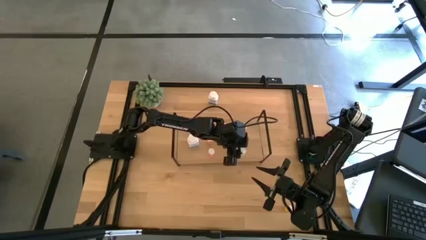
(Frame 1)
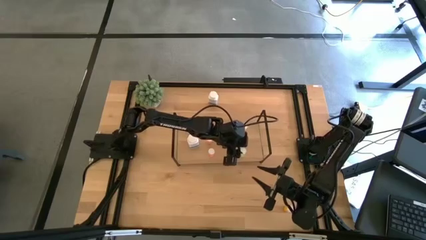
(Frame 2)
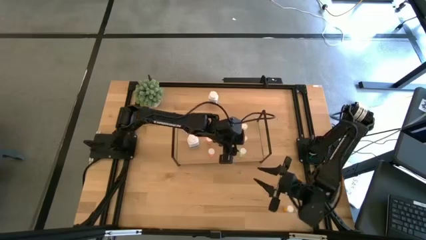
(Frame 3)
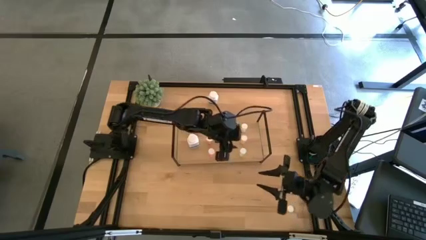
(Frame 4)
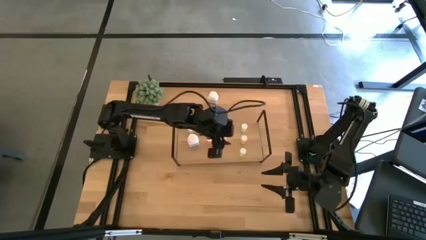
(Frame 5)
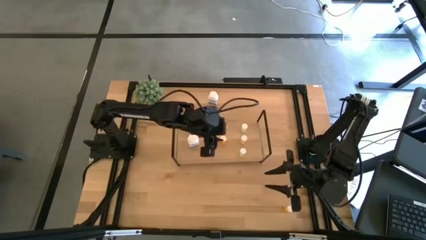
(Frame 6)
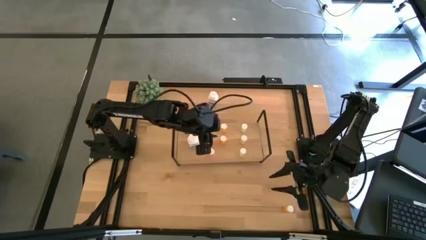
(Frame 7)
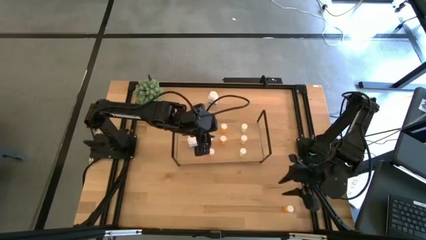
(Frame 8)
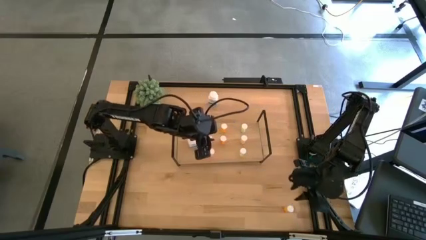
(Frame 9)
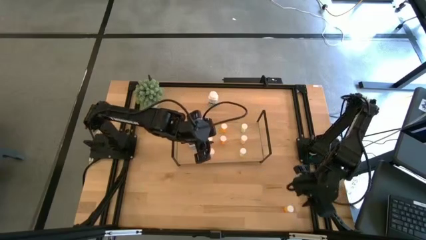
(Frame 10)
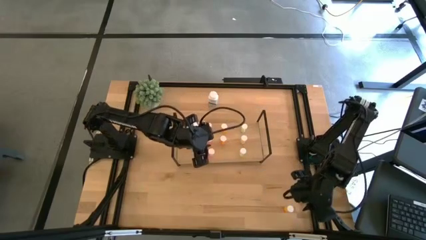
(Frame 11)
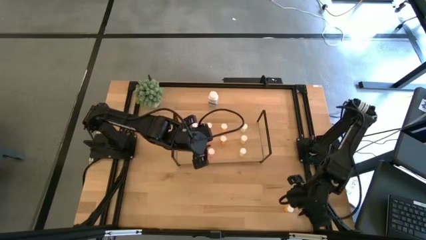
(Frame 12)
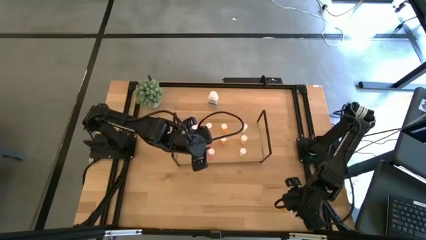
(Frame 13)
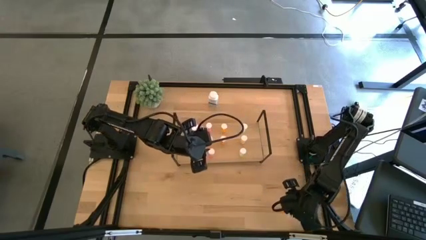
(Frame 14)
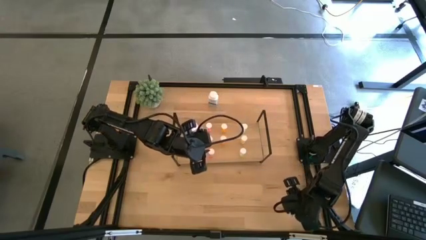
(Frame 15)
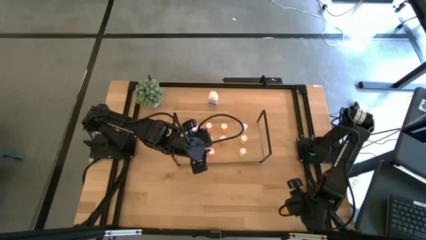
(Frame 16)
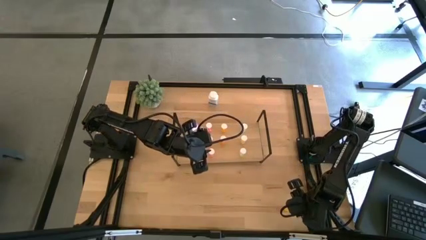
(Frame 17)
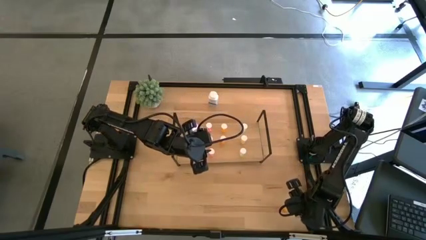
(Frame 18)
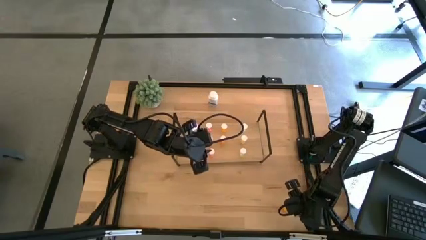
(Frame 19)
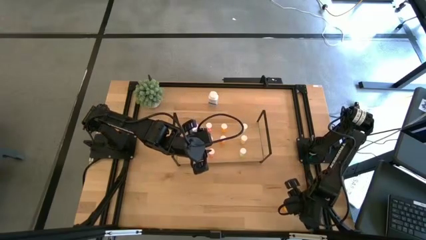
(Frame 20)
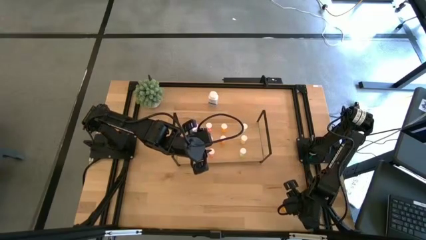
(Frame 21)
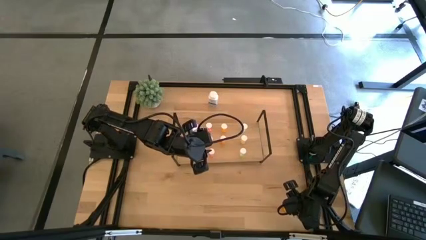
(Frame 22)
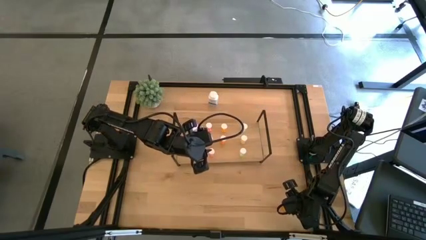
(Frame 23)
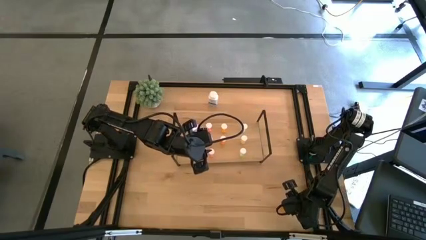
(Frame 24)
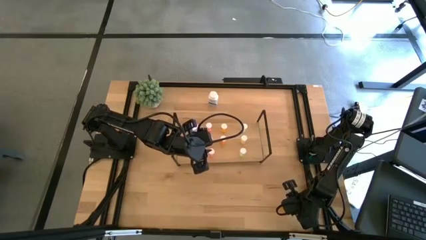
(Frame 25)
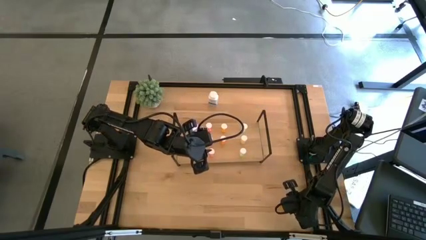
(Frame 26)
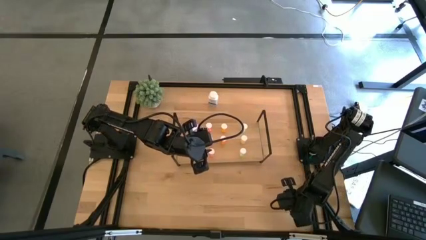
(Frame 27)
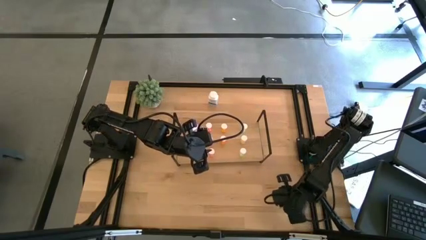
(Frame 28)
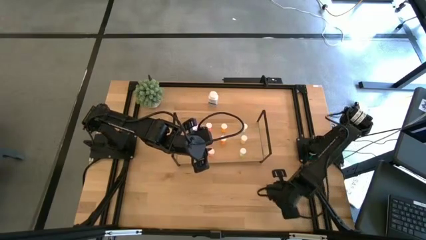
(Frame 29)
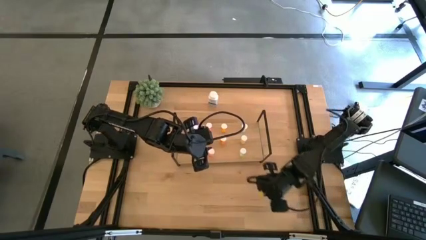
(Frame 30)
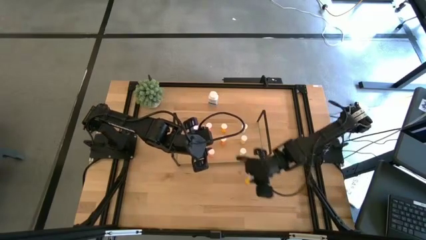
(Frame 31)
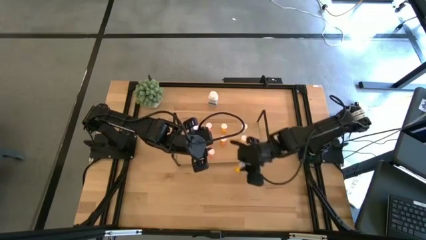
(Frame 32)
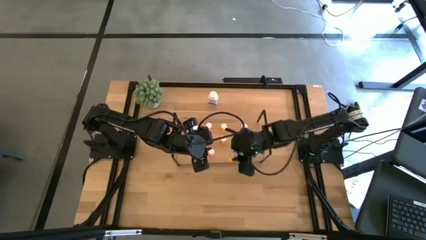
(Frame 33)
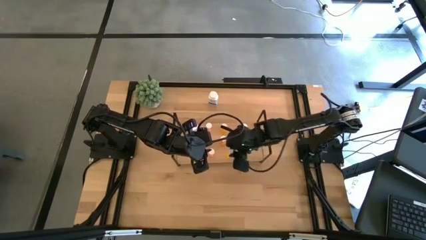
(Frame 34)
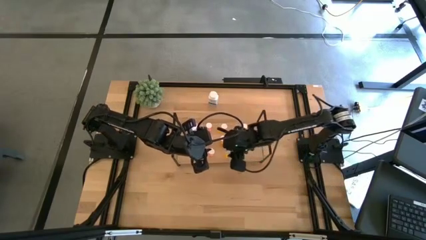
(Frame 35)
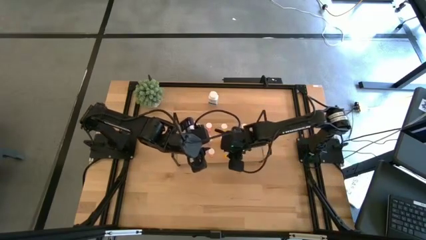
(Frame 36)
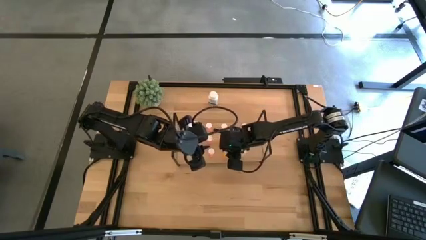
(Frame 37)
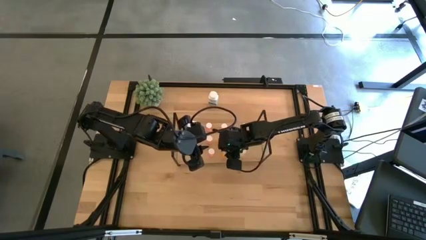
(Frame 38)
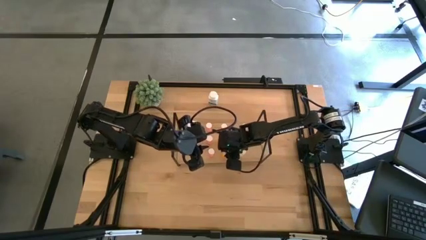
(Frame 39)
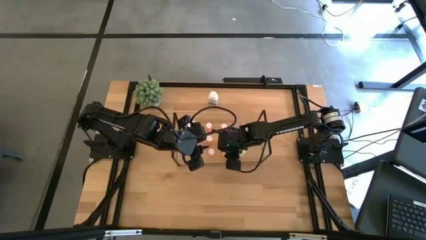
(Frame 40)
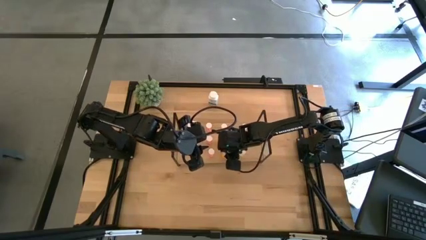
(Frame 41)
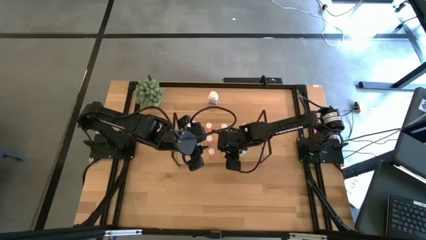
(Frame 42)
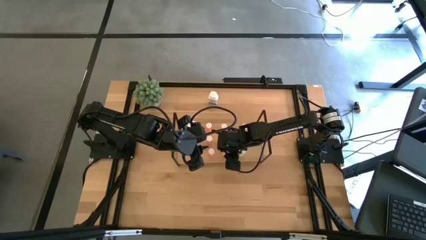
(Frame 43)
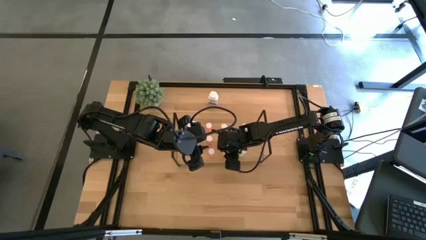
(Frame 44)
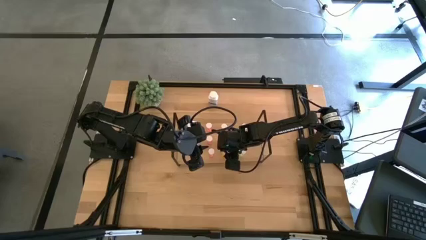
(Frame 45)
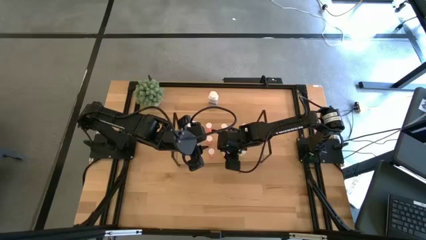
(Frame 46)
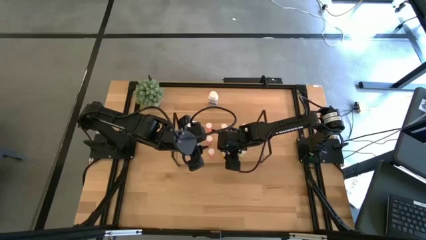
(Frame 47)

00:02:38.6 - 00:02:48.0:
Task: Pick and place medicine bottles onto shelf by color
Put the orange pill bottle on the shelf aligned with the other orange pill bottles

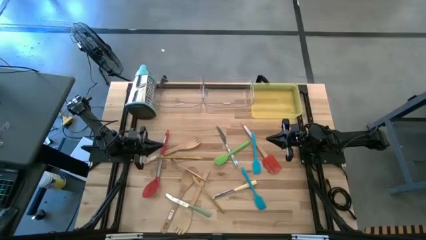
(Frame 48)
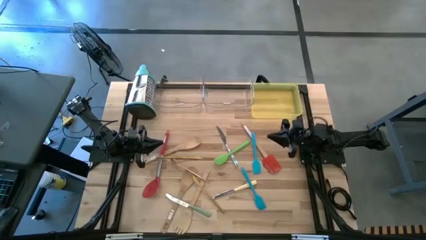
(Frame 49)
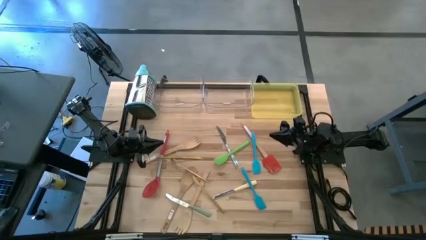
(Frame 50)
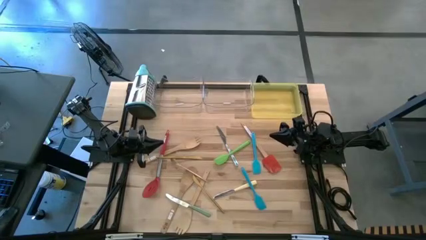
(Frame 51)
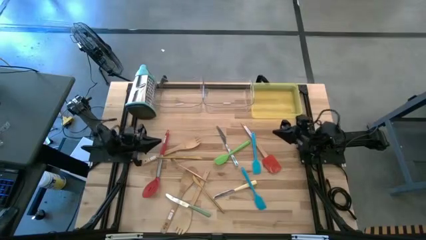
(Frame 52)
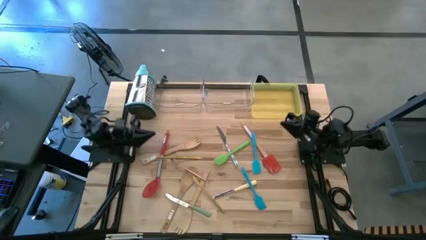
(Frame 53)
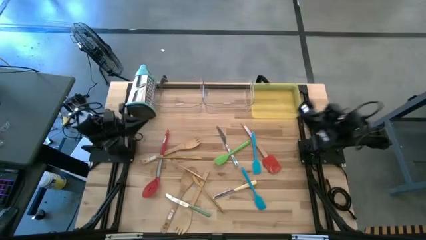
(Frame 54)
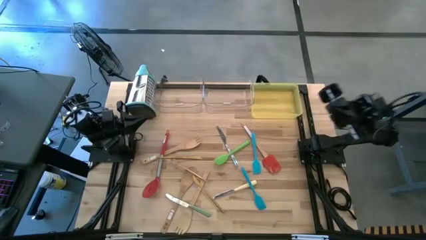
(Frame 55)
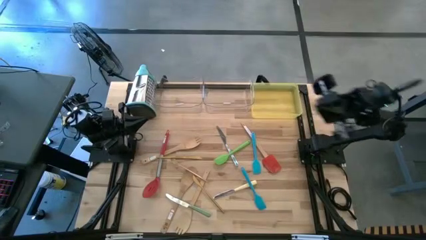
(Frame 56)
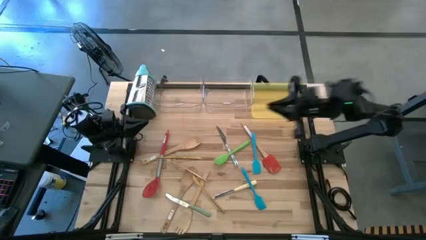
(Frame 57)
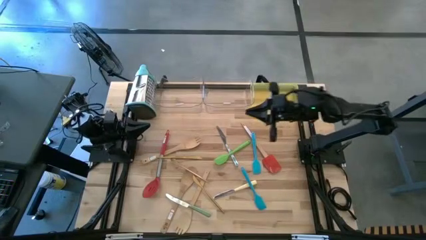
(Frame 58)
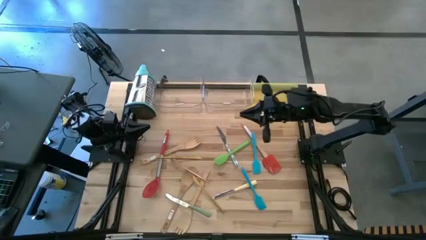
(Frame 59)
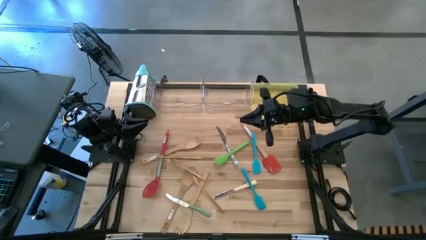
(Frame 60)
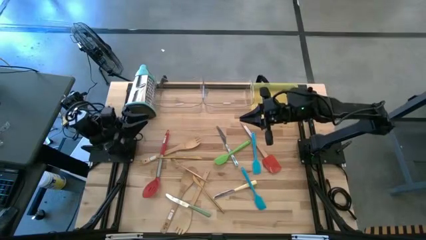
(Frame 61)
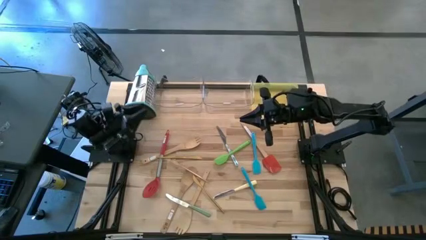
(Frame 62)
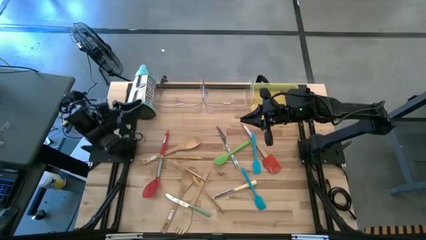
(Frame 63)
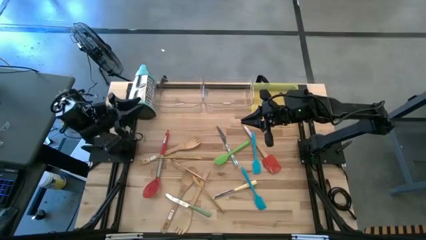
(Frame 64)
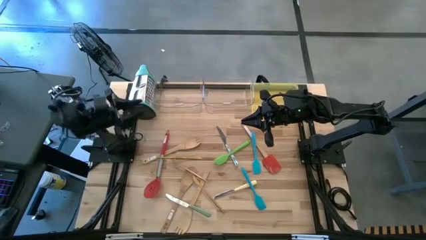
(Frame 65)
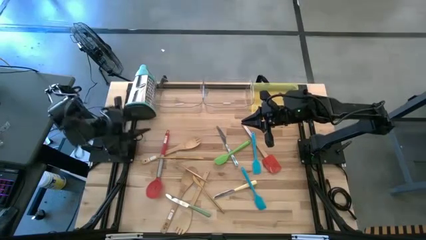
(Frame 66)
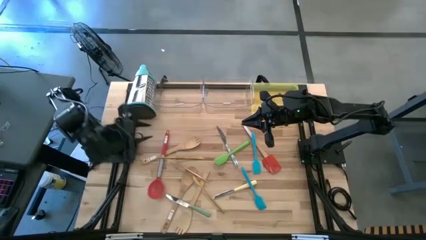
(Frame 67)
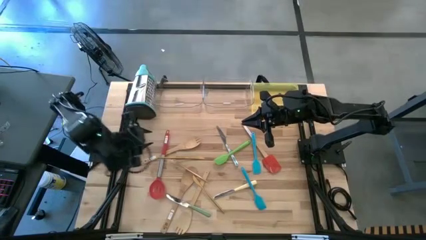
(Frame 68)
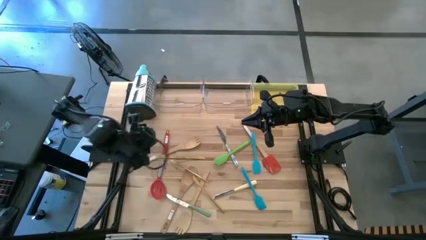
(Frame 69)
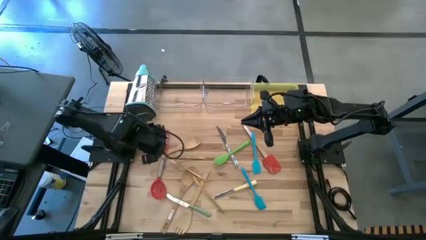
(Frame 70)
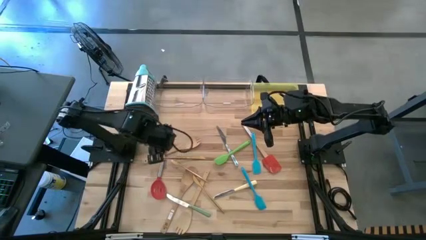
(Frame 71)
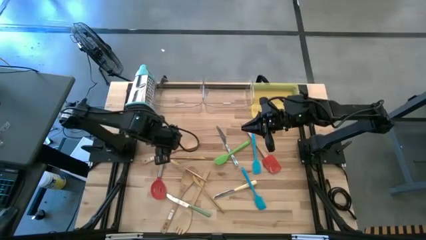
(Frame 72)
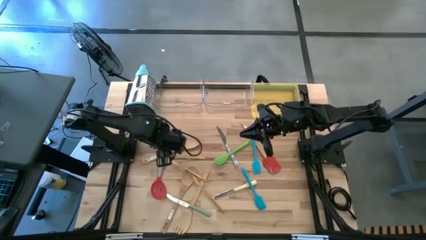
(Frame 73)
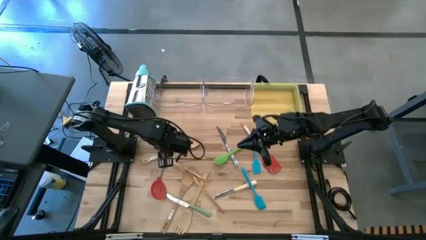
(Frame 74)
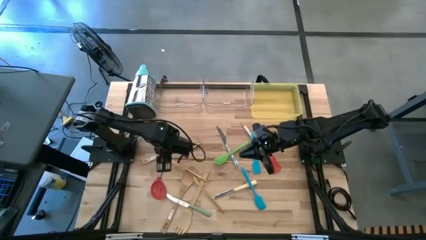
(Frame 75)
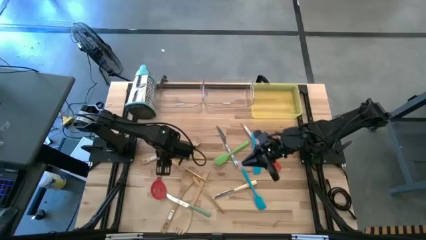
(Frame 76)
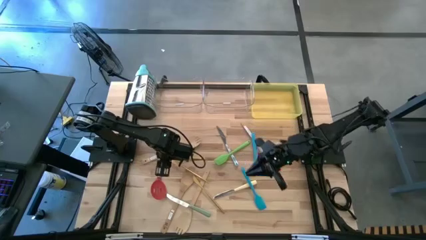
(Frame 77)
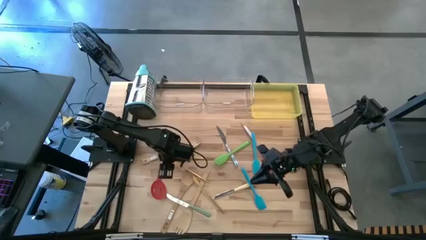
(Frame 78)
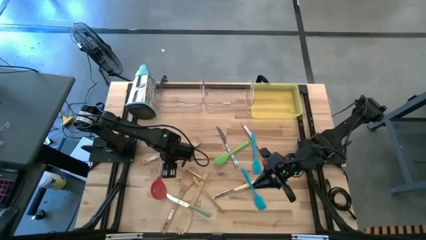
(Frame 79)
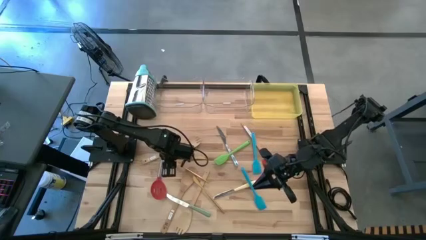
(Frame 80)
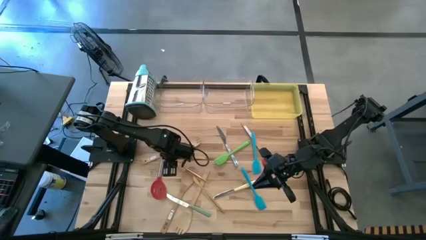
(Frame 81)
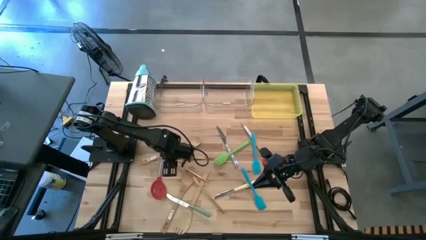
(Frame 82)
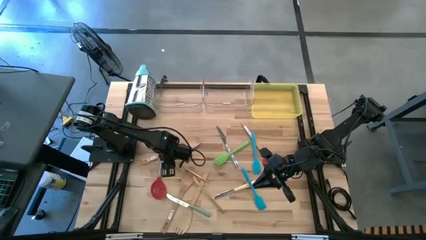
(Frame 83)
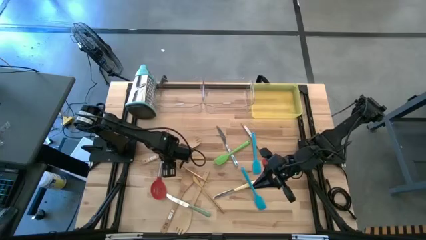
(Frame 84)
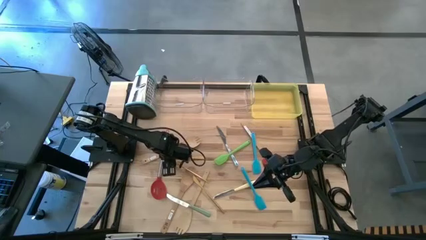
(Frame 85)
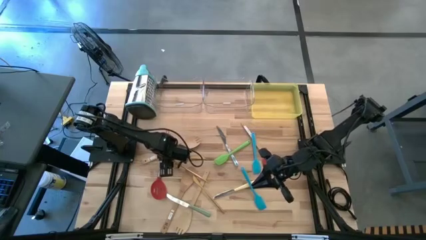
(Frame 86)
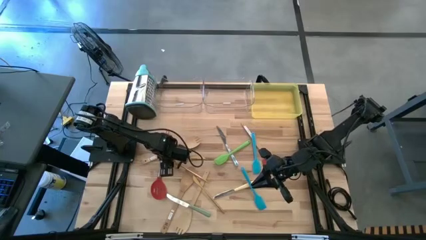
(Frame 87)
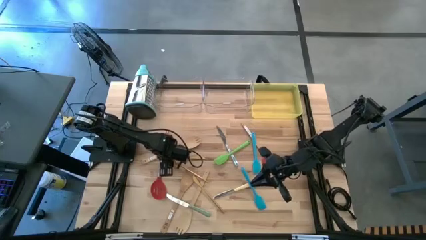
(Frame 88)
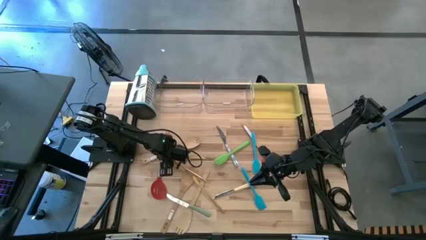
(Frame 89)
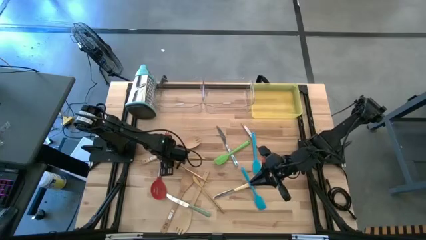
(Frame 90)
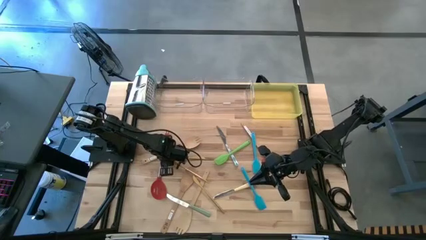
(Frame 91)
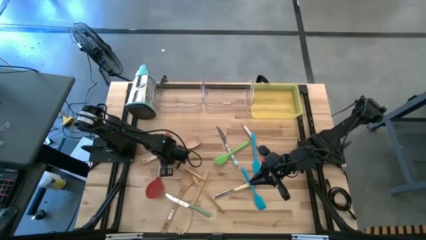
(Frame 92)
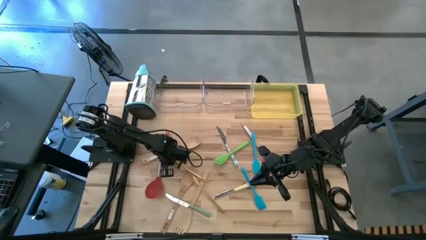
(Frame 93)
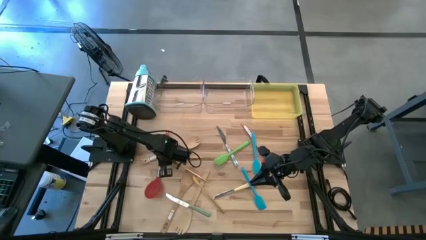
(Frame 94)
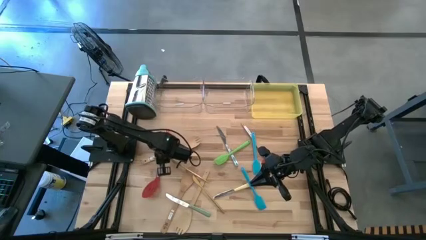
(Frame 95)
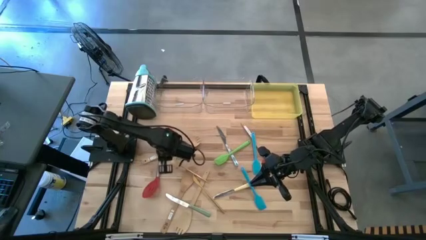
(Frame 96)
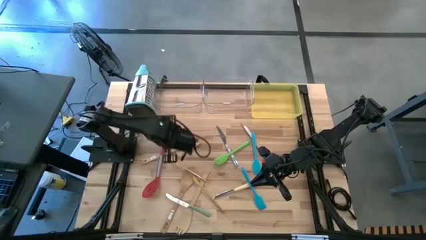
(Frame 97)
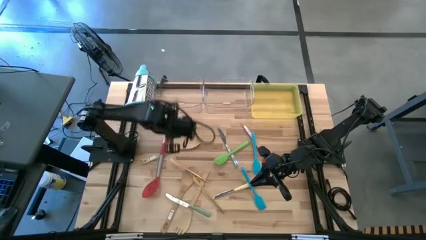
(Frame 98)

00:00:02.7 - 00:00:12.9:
Task: Pick & Place Kitchen Items
Put the top gold knife into the yellow bin
